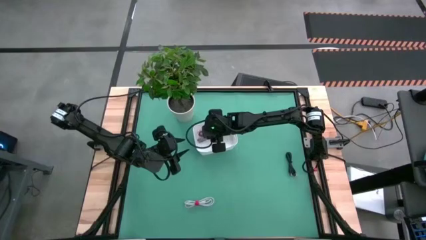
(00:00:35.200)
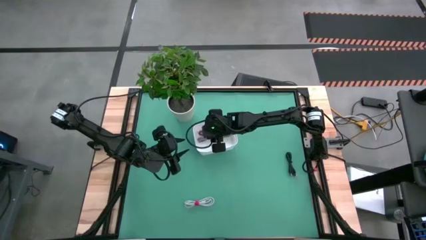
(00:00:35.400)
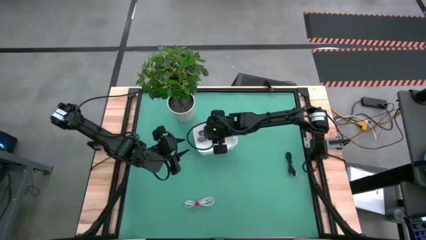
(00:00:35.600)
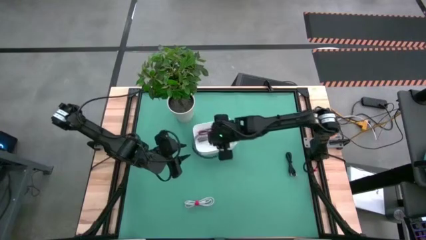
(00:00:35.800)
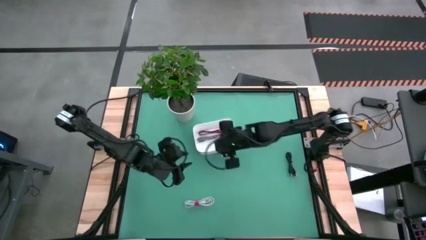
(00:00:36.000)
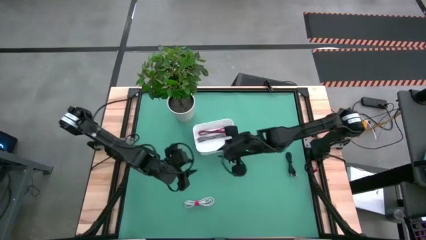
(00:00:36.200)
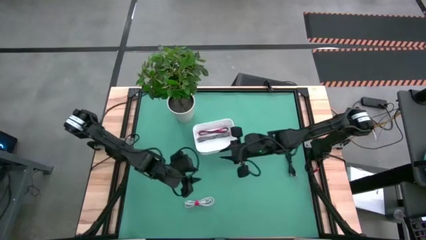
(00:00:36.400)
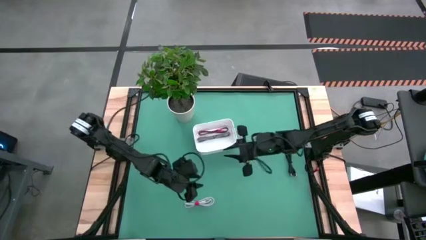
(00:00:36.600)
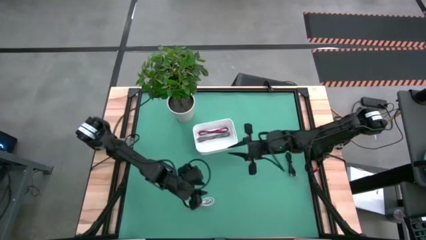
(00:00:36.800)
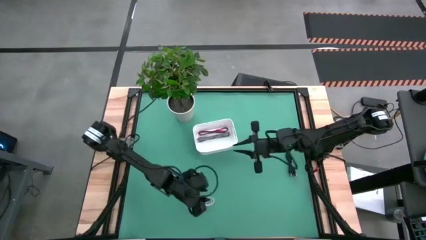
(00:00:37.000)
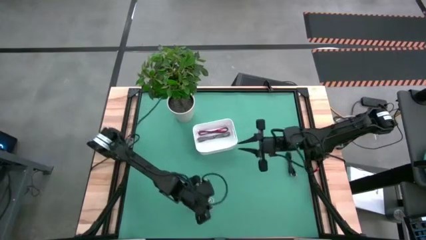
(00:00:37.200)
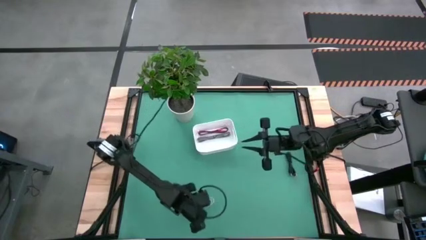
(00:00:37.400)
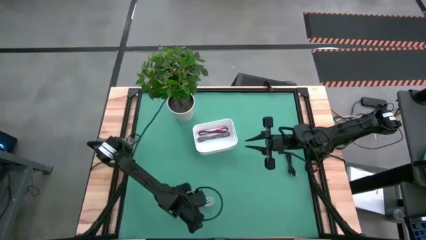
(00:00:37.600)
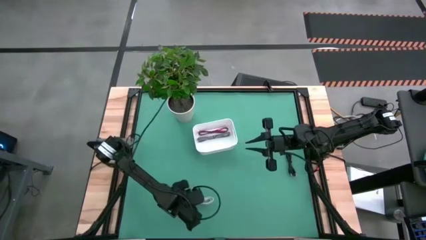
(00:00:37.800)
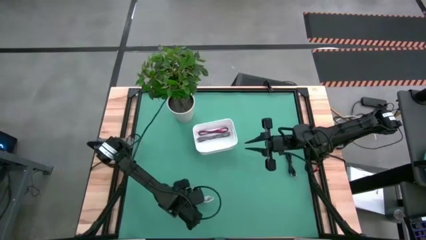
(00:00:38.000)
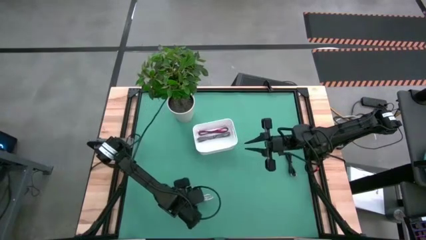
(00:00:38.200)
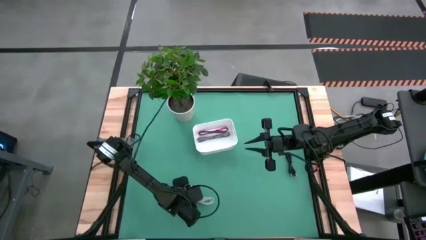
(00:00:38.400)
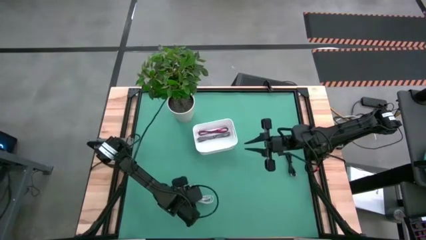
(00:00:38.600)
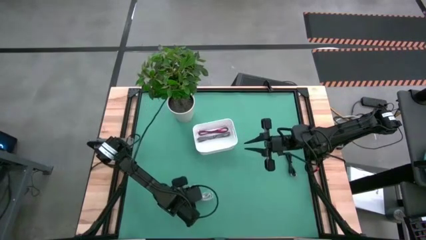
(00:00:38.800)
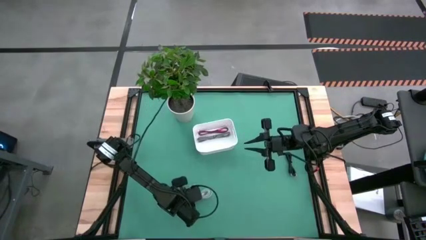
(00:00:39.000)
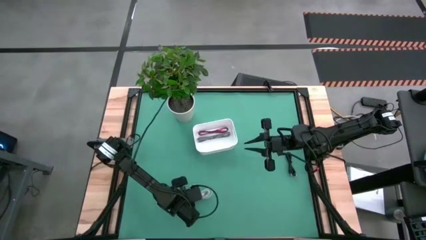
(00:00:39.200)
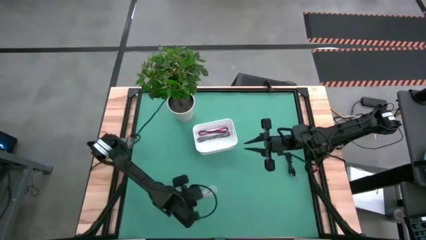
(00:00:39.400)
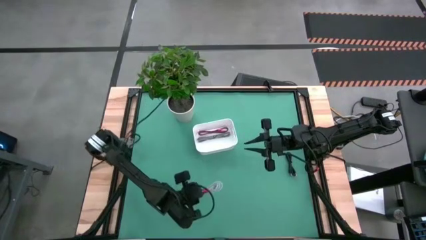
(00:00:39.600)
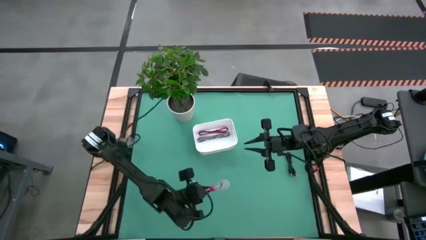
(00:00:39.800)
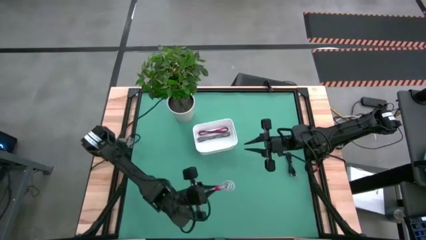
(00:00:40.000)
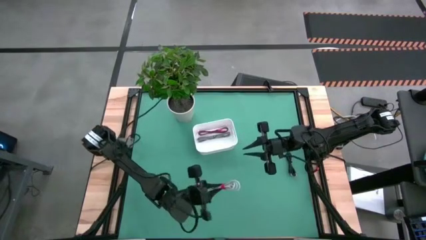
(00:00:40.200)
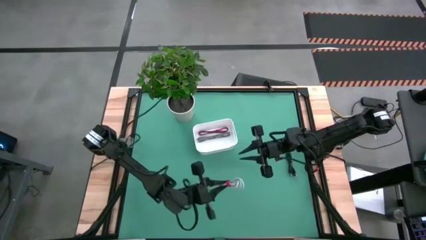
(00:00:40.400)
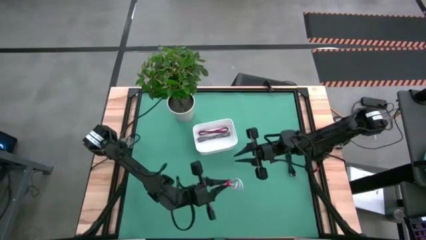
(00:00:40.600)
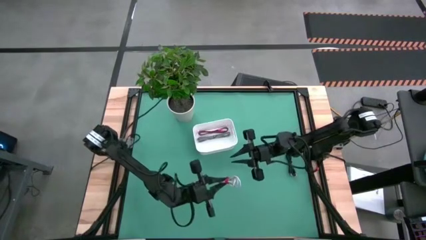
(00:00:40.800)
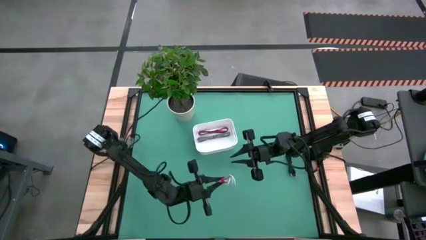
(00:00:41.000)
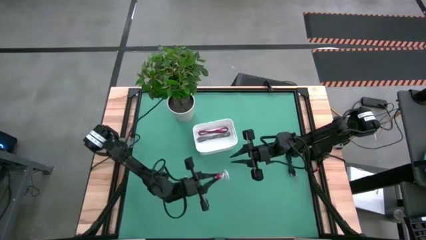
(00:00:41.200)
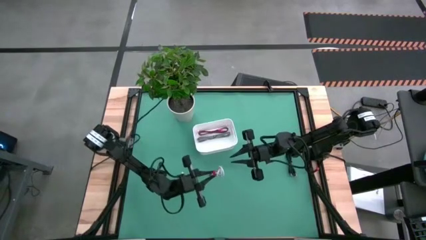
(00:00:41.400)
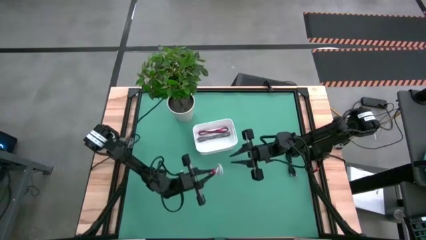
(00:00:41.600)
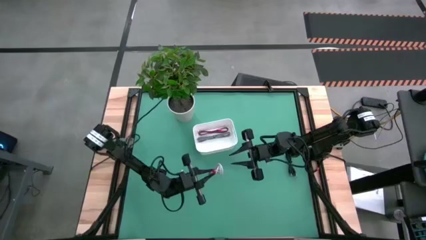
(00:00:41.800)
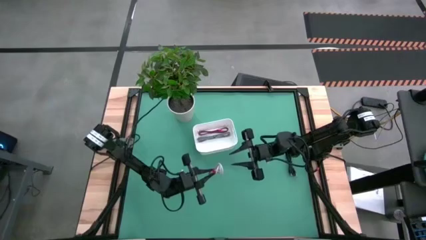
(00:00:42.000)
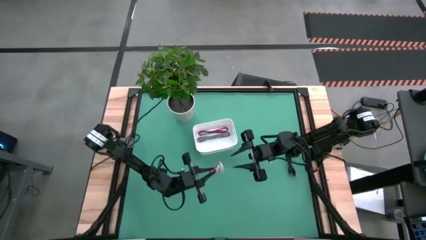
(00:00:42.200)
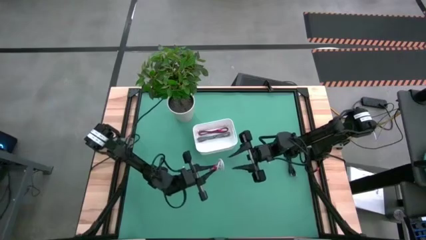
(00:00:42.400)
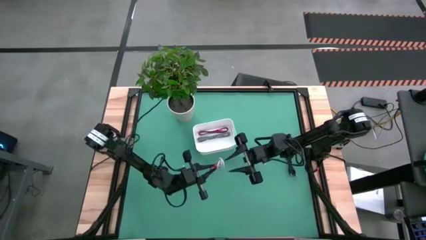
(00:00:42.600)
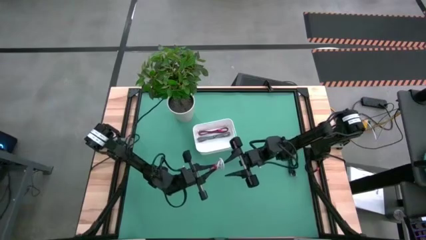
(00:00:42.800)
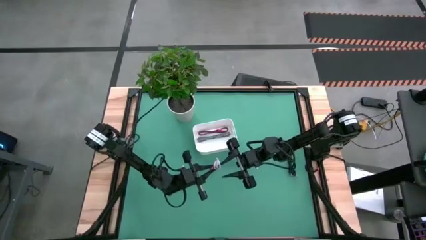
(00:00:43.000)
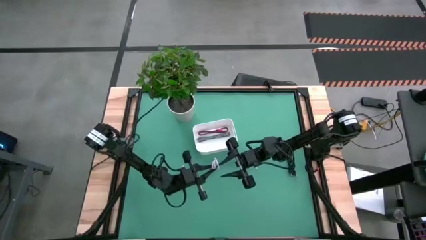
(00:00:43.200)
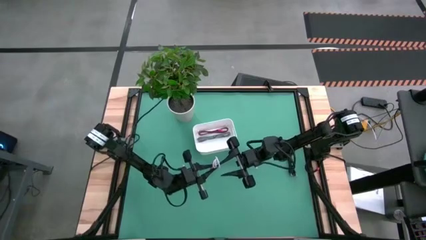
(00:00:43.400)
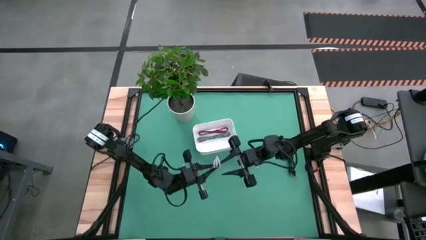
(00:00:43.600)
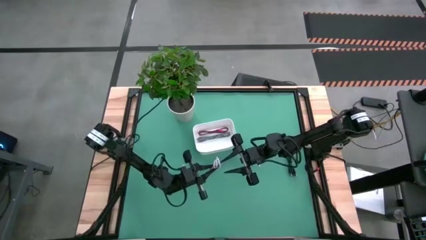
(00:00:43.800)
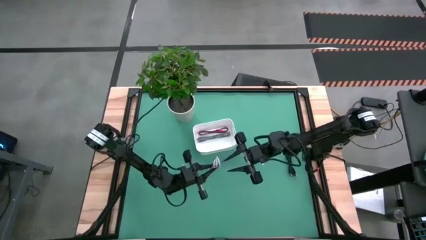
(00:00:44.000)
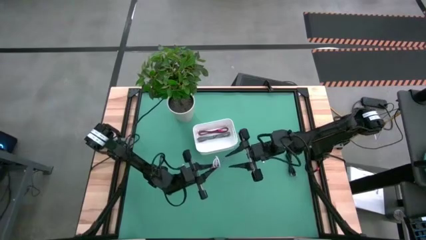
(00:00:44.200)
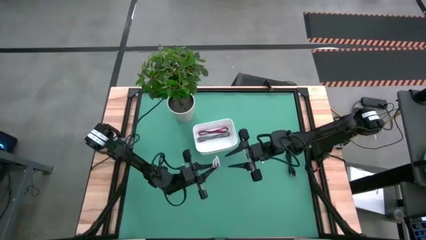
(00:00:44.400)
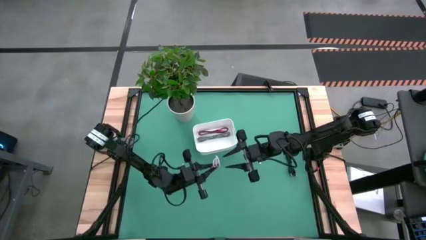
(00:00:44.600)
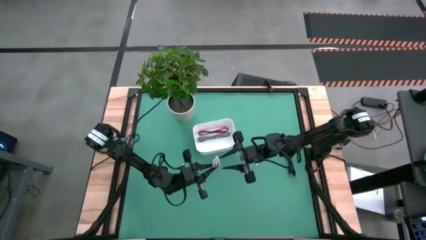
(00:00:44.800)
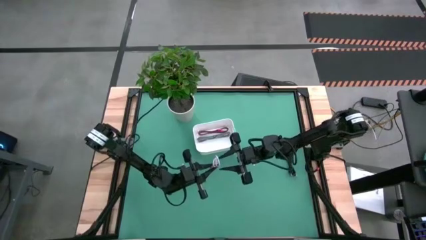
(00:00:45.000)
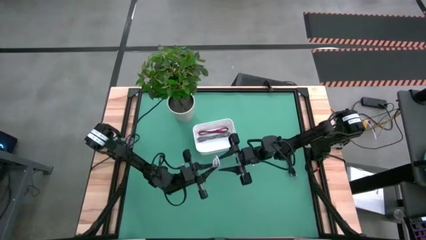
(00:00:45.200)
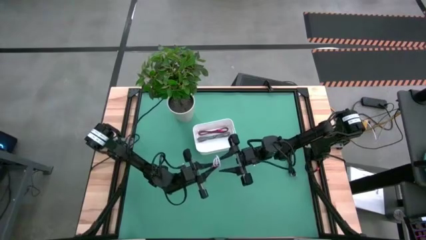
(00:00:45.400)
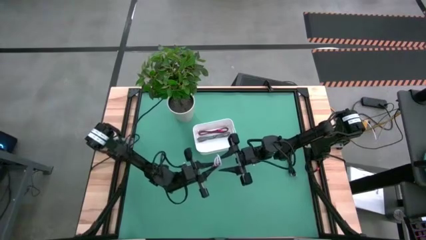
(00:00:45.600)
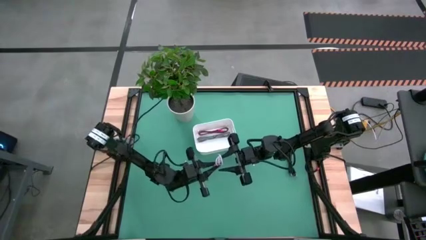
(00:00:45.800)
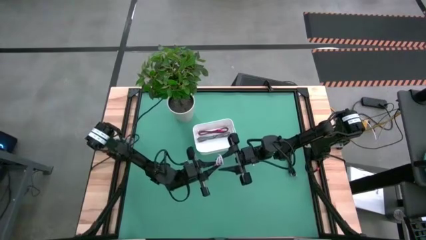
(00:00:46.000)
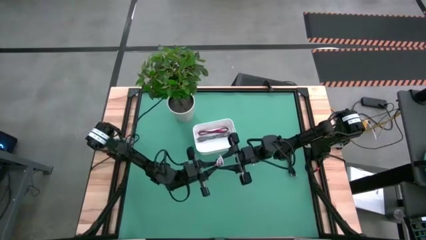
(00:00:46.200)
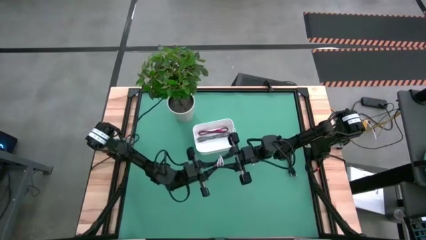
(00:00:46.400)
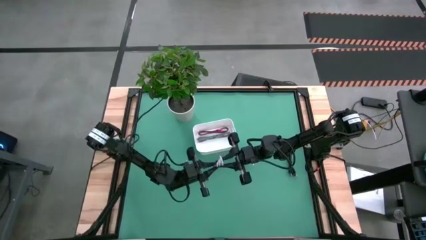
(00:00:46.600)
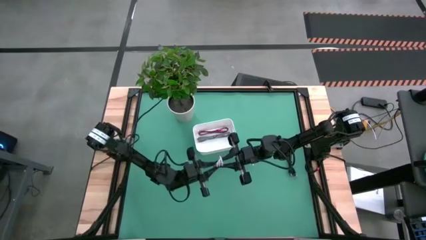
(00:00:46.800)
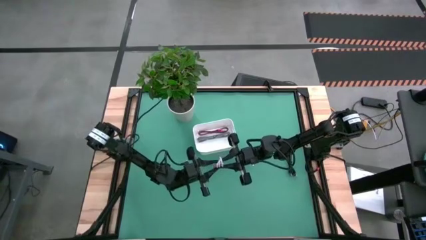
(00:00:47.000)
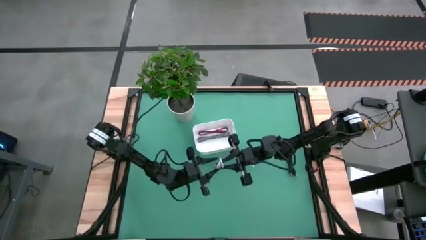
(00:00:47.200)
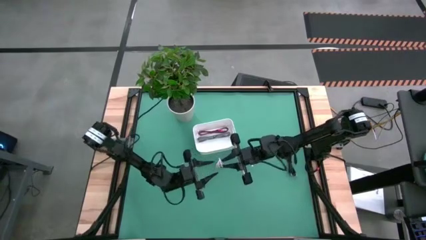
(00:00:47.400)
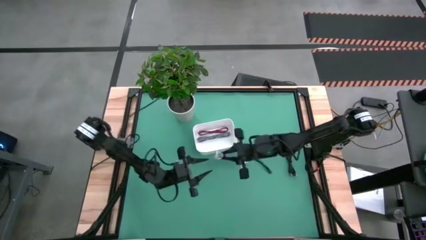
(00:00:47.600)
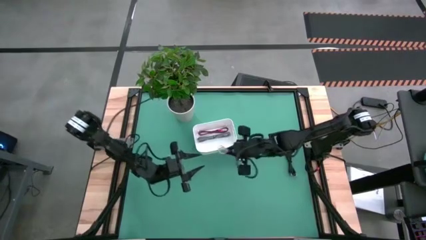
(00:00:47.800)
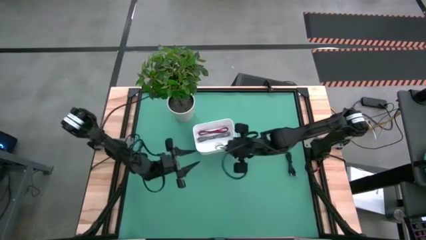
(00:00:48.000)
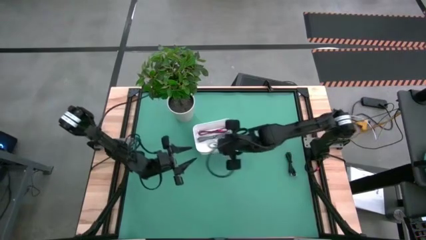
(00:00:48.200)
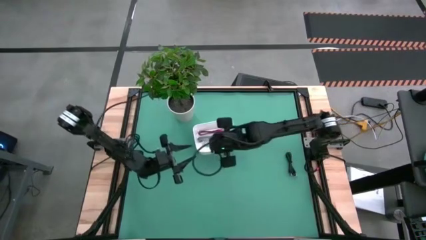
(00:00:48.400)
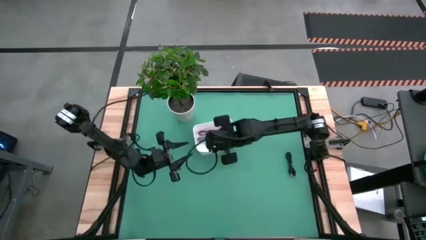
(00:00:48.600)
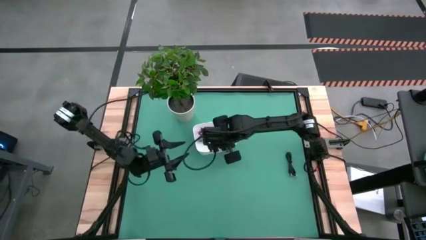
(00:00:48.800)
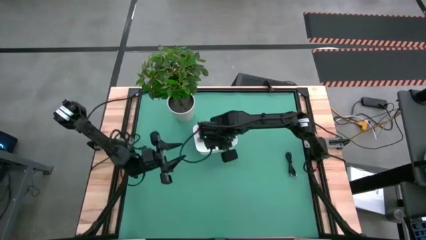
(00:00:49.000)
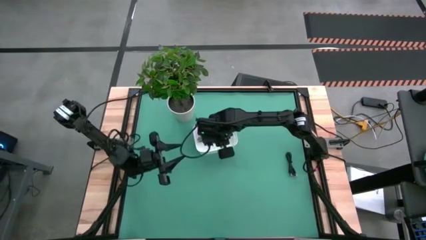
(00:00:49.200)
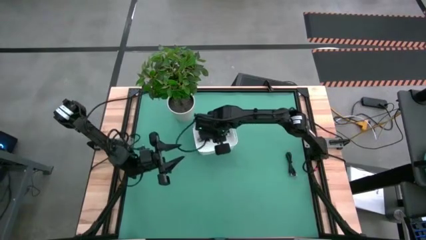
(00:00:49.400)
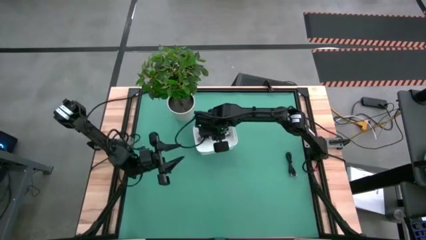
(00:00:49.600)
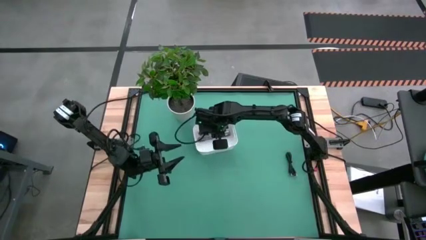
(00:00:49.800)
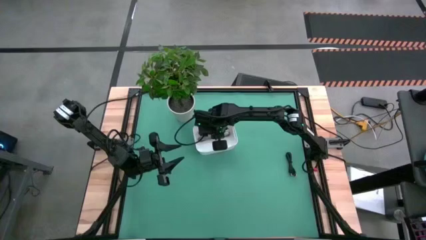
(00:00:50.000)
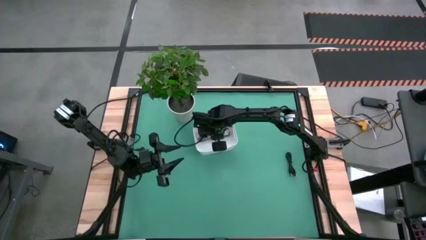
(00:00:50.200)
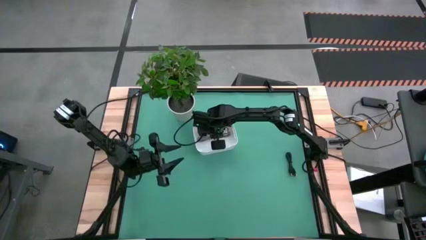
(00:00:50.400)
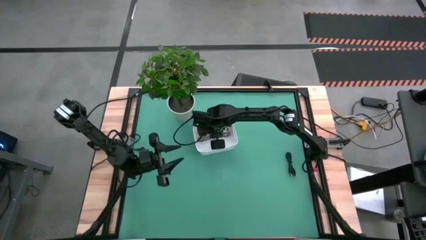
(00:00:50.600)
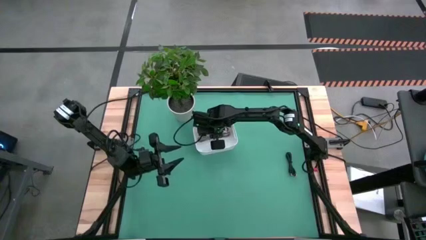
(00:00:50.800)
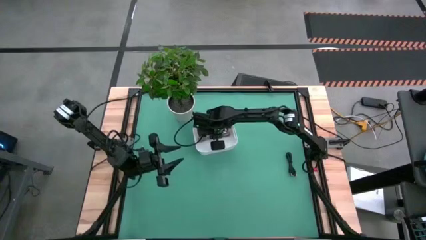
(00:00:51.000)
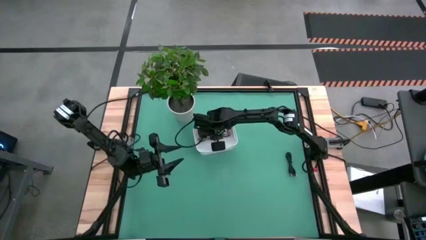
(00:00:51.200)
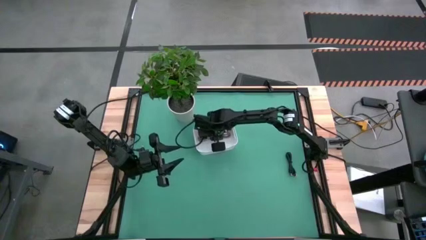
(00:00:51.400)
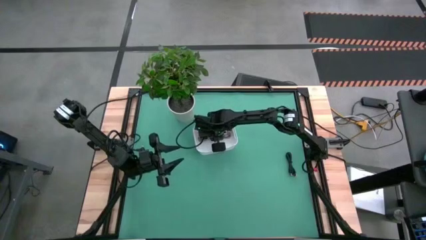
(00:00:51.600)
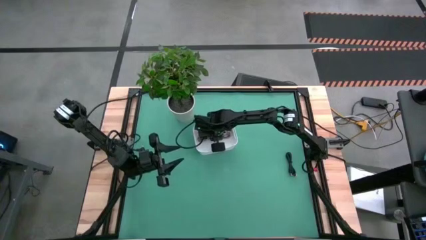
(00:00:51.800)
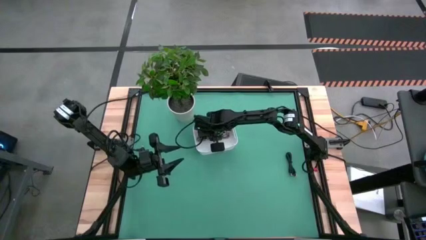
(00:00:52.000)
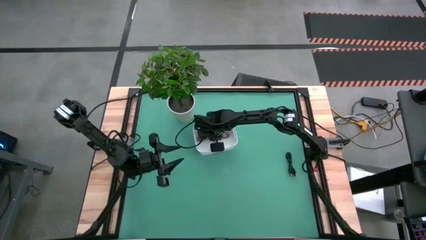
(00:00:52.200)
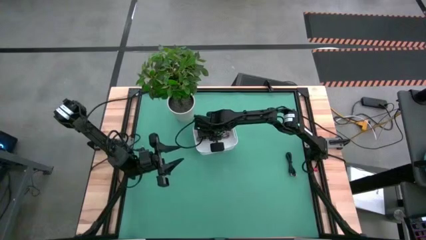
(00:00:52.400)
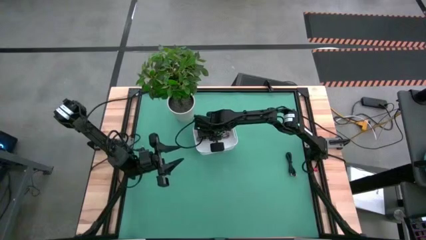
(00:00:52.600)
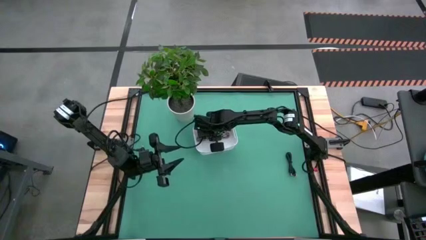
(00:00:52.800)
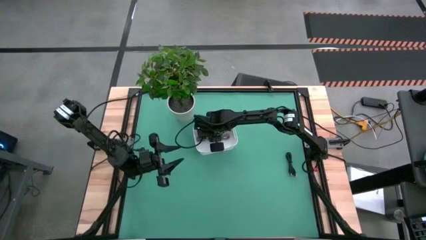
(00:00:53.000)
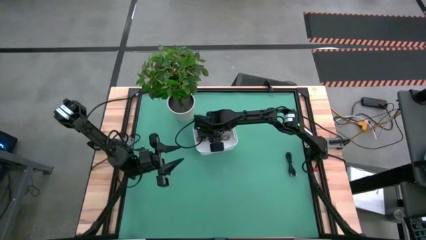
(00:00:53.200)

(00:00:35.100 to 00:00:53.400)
Task: Pick and place USB-C Cables
Put the white charger cable into the white bin
